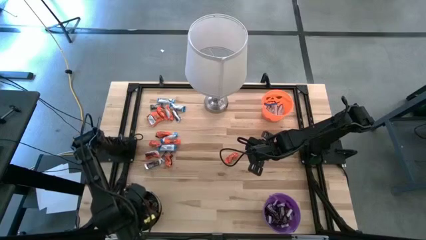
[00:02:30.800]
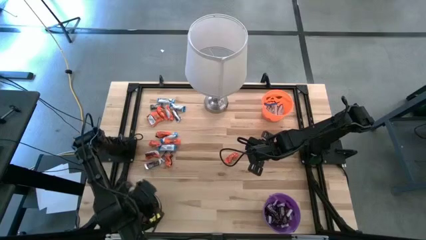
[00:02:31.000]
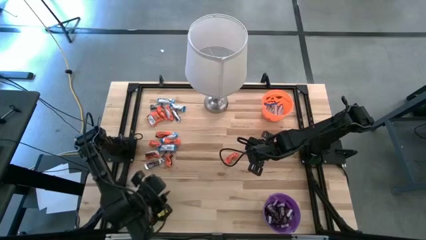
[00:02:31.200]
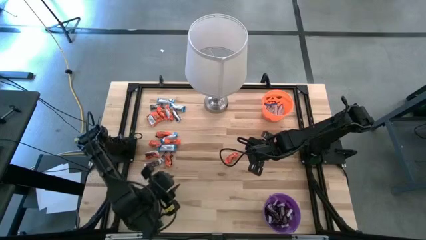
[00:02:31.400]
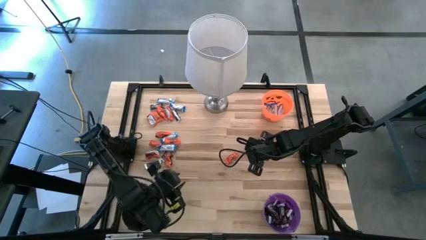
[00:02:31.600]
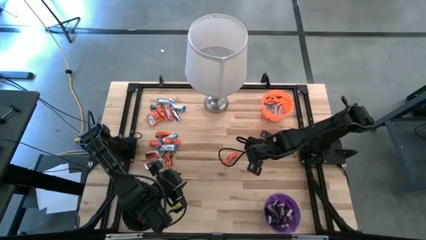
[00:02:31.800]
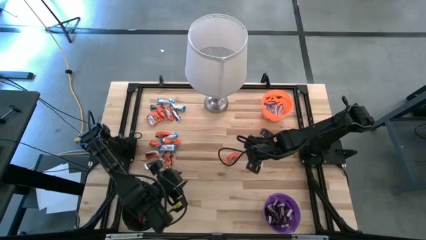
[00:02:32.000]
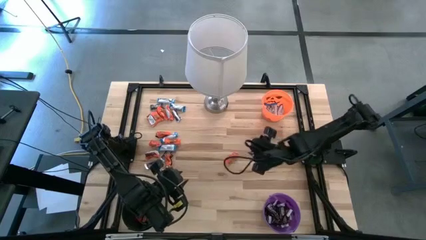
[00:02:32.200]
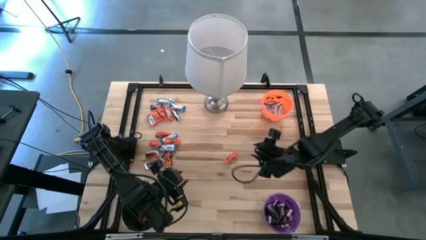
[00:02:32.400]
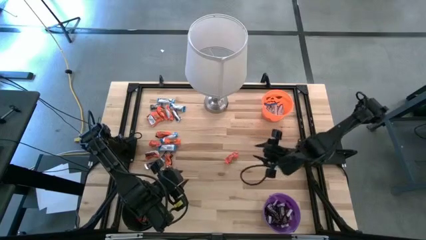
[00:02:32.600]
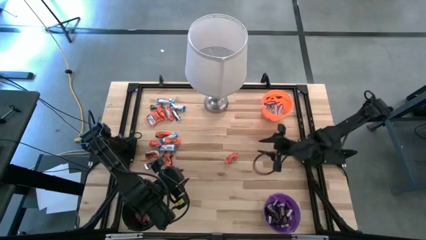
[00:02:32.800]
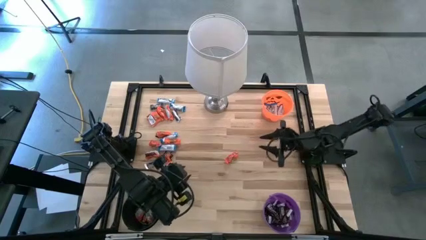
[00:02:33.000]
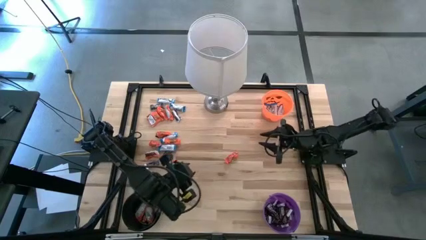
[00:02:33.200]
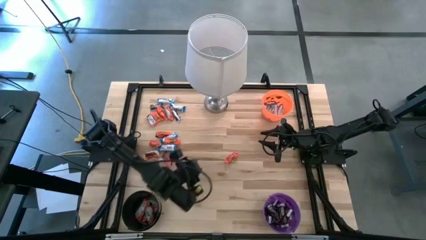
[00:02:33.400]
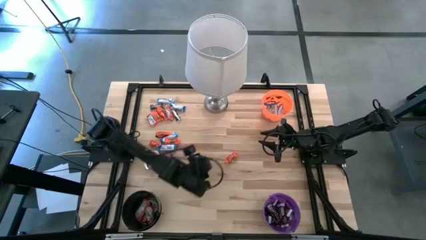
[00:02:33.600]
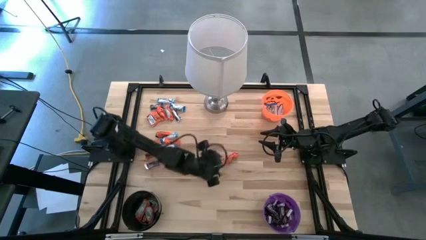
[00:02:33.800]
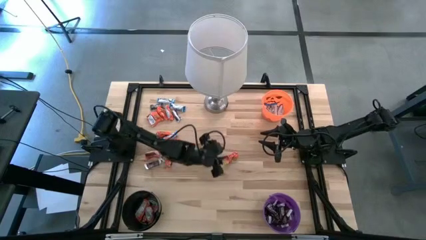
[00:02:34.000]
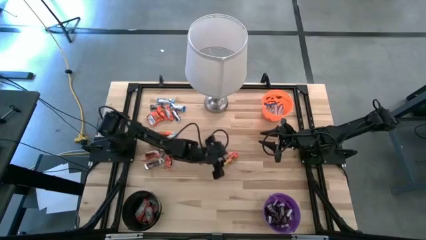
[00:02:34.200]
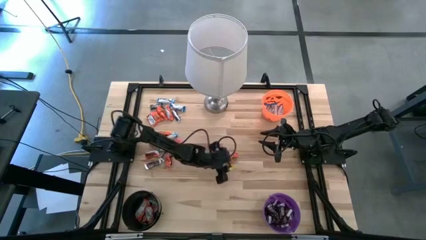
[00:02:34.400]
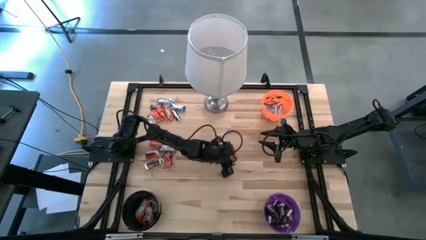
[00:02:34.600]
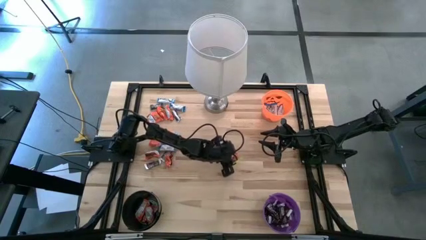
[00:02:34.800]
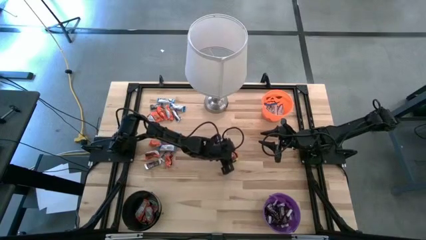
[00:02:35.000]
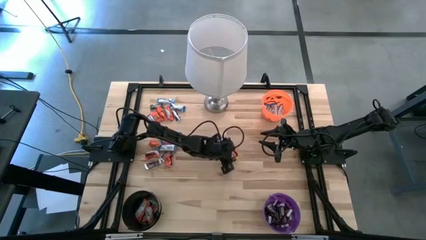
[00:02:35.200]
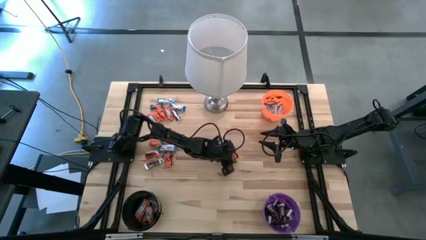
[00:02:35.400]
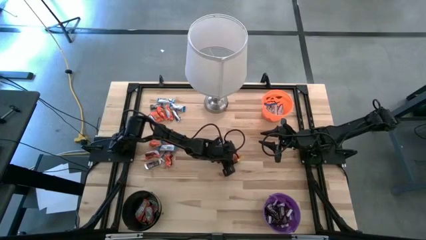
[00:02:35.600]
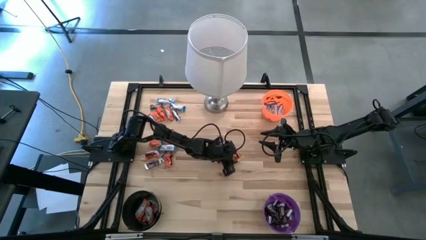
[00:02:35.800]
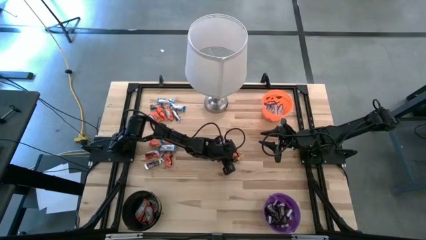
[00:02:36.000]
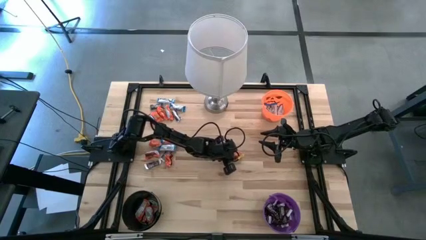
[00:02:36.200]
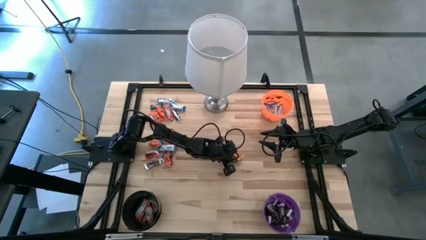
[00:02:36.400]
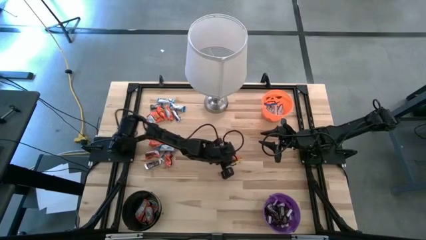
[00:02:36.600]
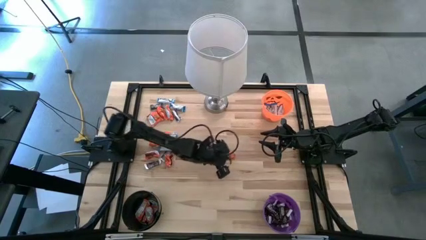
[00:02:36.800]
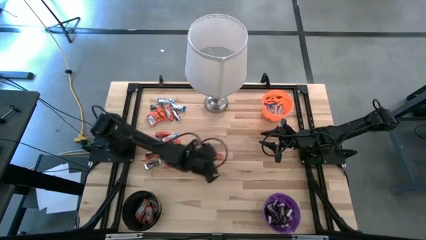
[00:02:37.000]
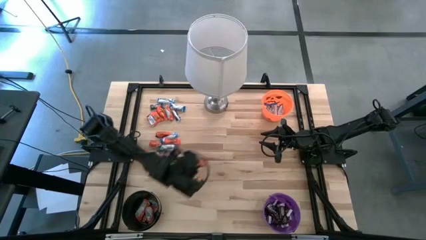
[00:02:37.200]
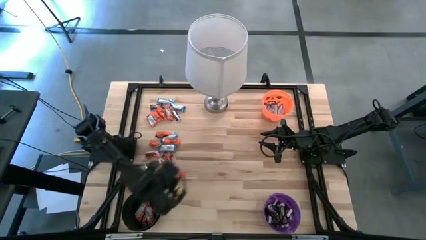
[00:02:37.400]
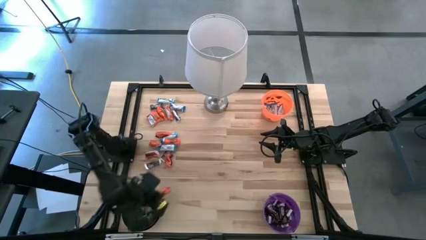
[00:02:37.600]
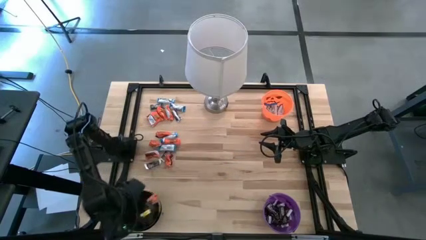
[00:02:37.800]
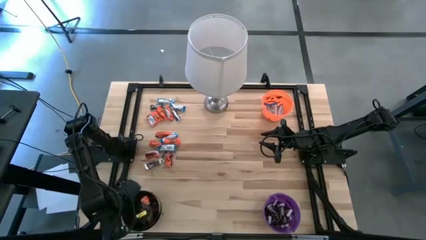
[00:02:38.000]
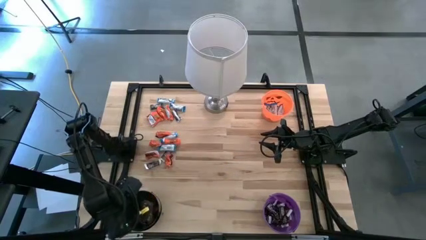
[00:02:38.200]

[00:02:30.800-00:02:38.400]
Task: Sort candy
Put the orange chocolate bar into the black bucket

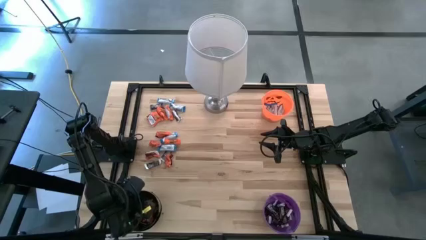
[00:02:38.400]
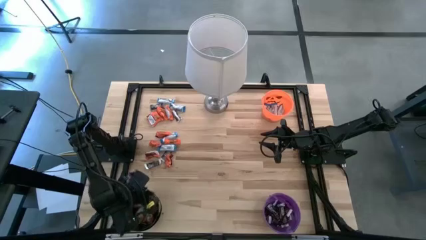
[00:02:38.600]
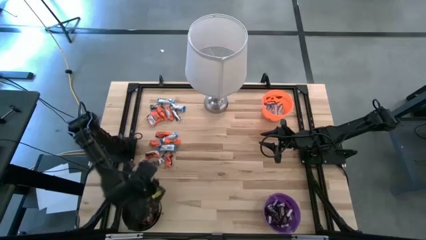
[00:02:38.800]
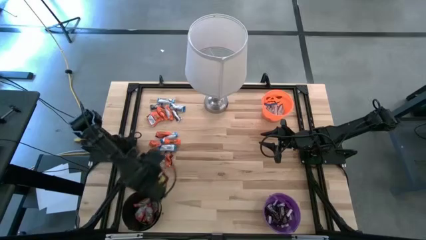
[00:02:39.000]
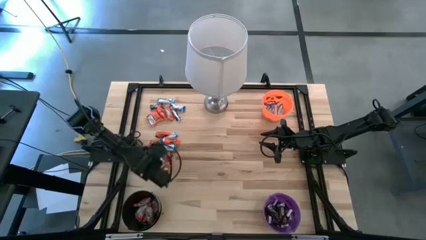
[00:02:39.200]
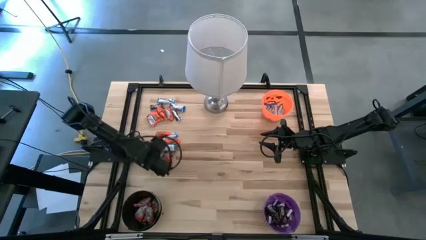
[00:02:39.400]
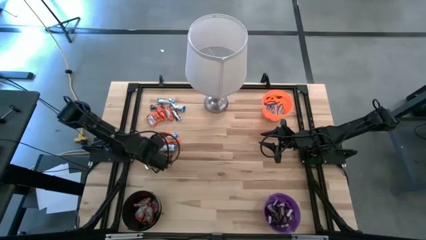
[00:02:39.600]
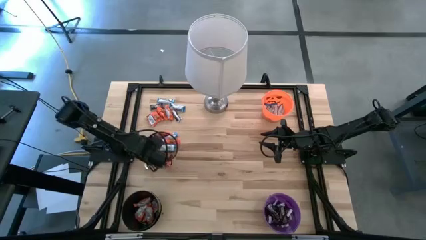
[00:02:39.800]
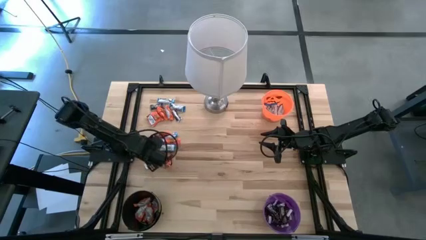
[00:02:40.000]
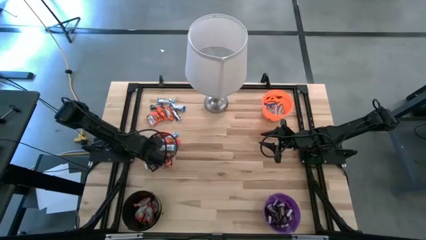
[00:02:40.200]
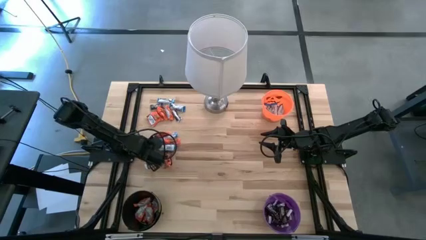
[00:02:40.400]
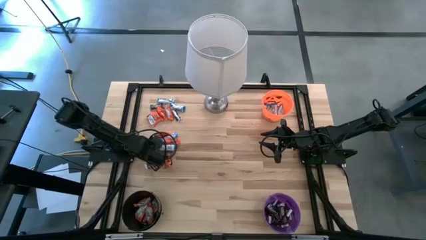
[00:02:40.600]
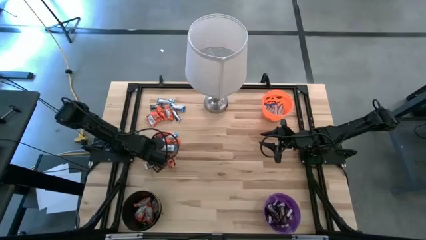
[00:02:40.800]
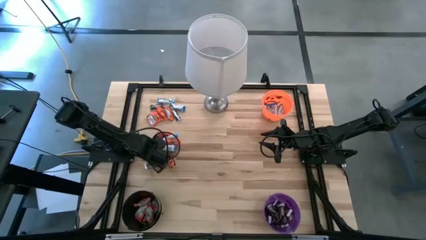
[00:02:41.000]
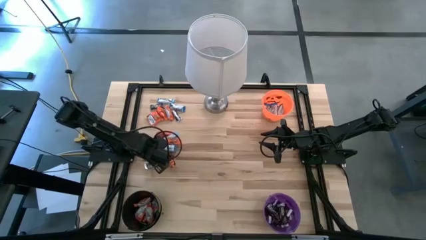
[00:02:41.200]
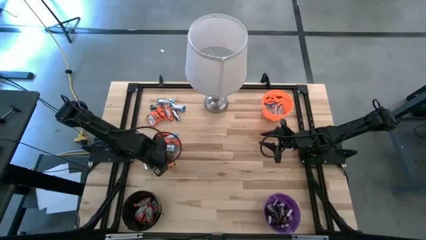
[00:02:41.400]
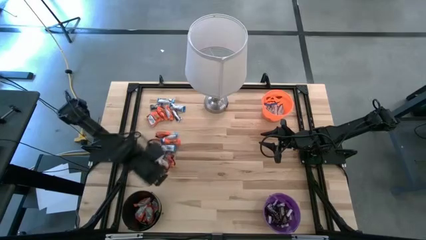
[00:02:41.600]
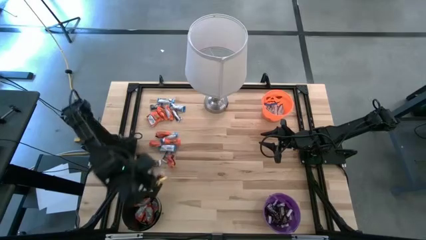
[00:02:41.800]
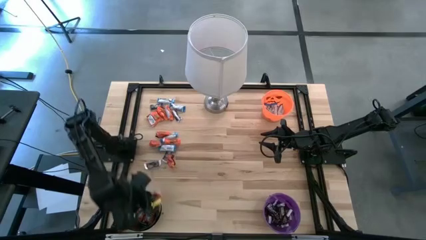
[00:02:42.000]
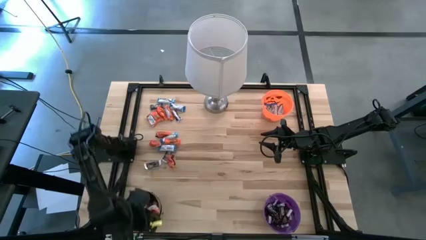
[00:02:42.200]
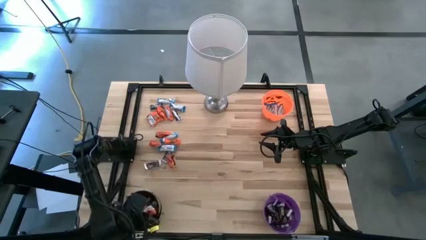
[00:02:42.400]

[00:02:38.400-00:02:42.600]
Put the orange chocolate bar into the black bucket

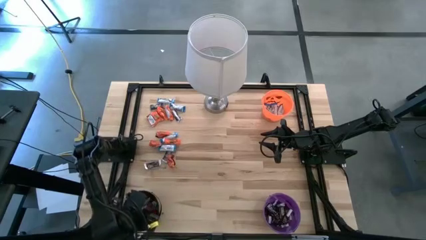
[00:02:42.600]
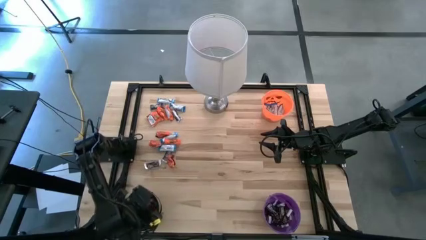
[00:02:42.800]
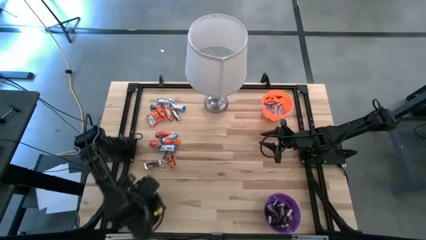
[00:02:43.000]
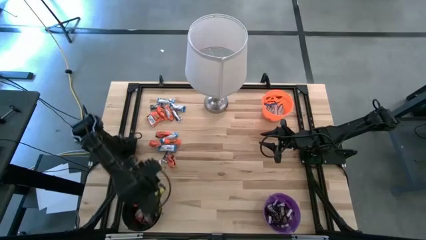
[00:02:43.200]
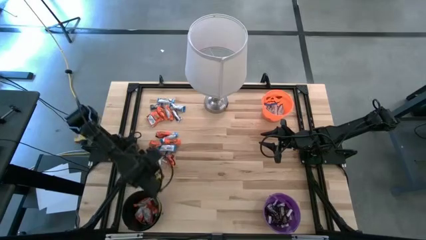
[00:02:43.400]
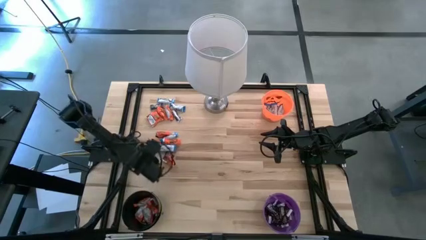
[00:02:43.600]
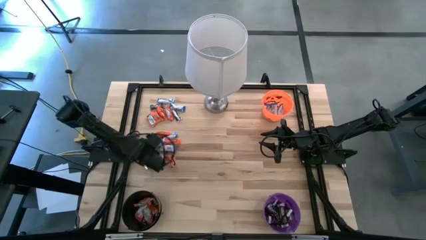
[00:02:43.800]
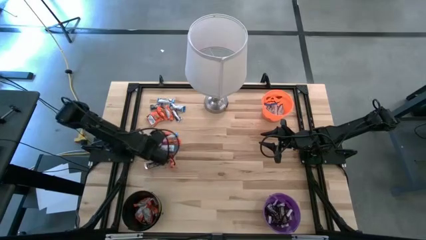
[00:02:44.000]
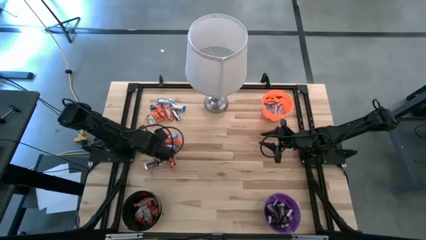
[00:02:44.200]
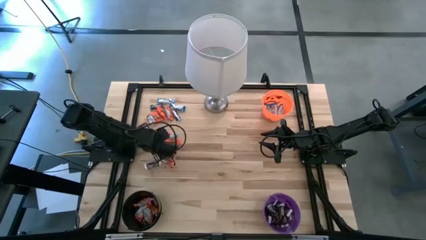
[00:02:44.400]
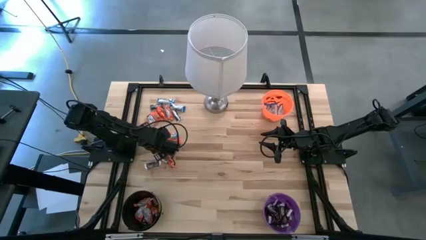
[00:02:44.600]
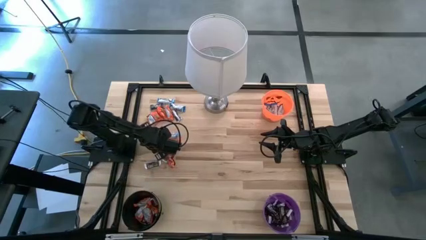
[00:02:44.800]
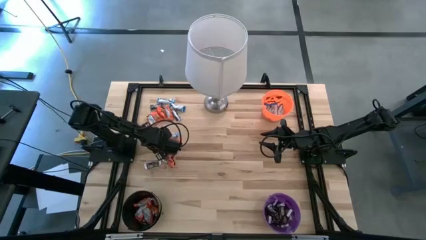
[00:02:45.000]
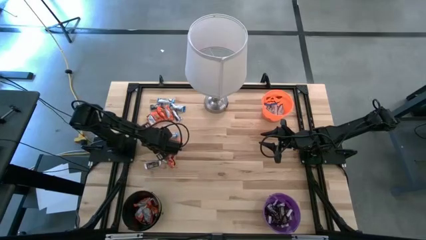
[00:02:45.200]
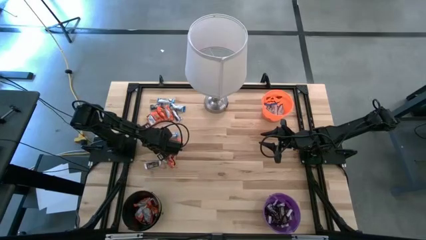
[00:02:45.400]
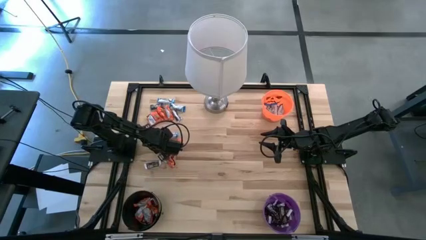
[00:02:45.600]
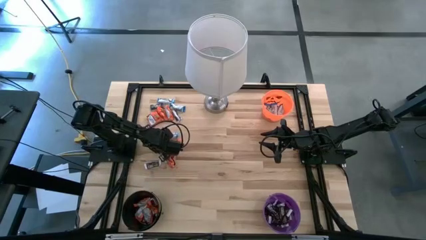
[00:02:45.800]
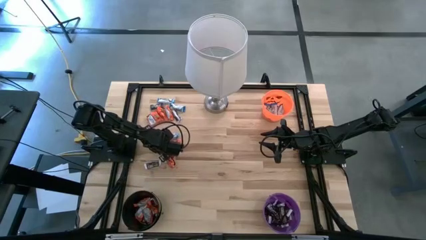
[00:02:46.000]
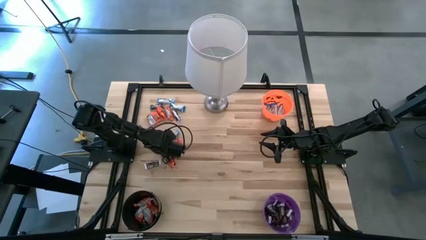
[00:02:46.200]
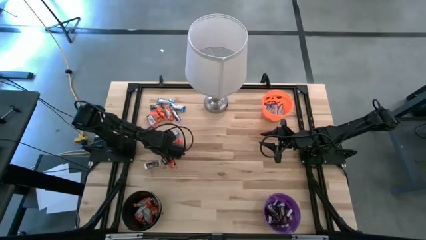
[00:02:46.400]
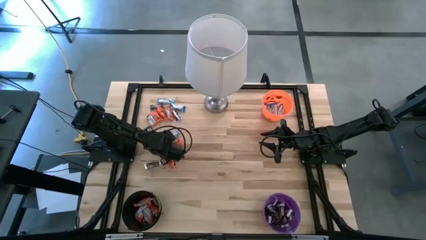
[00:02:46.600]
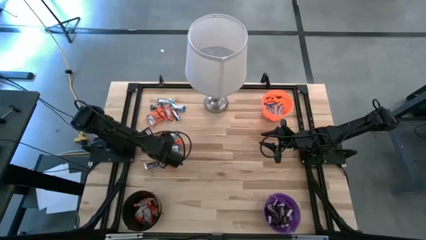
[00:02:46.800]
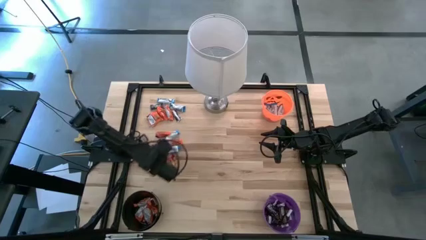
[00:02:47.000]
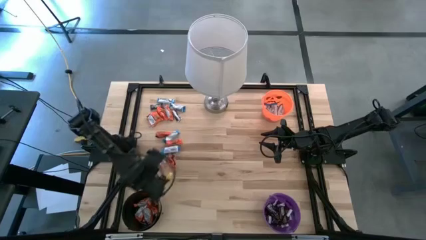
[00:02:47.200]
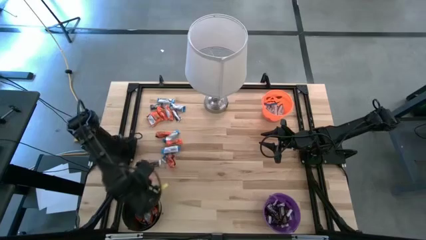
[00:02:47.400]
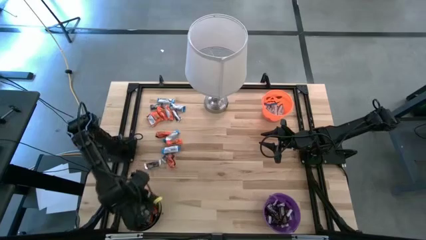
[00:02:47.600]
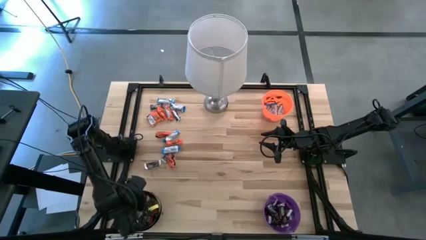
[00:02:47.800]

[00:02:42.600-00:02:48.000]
Put the orange chocolate bar into the black bucket
